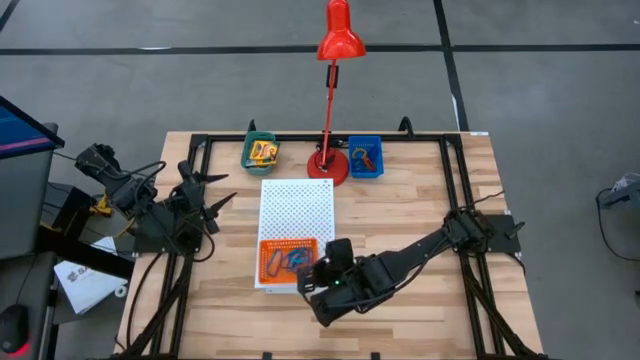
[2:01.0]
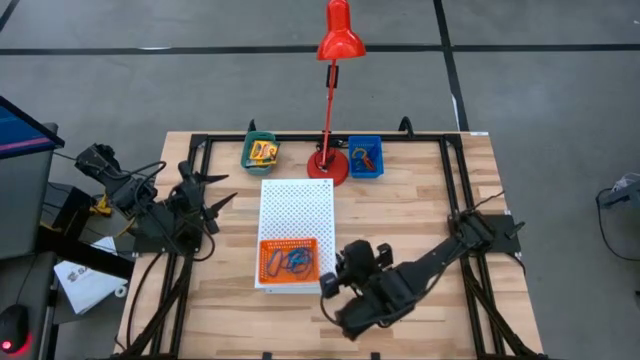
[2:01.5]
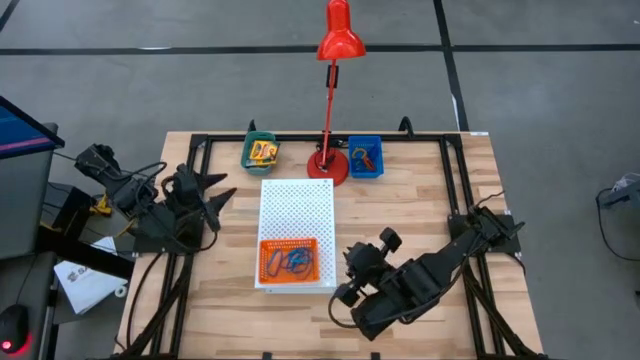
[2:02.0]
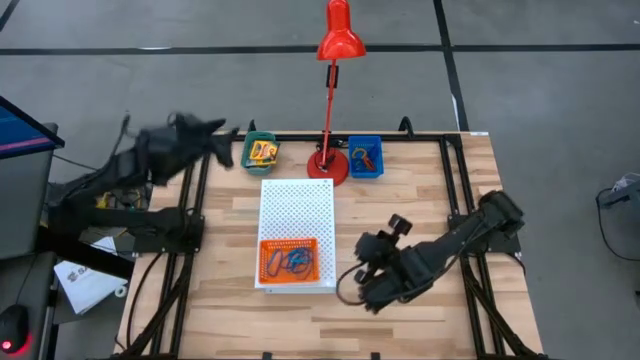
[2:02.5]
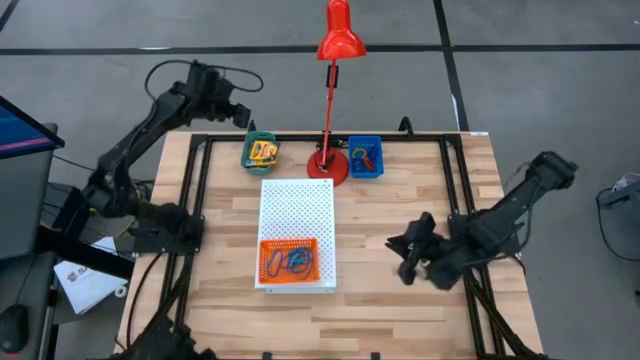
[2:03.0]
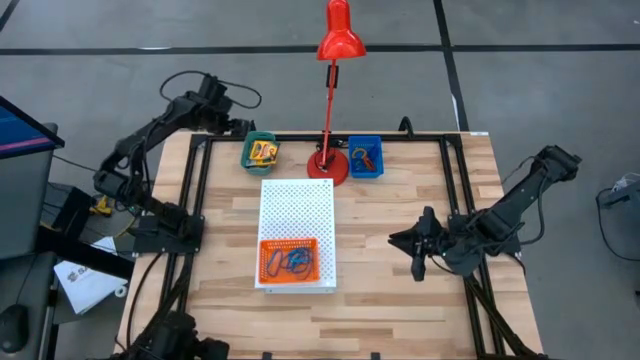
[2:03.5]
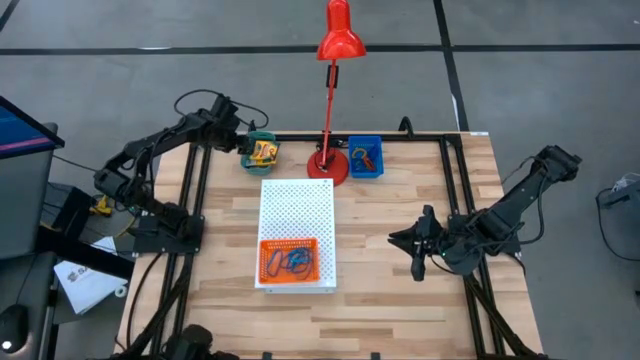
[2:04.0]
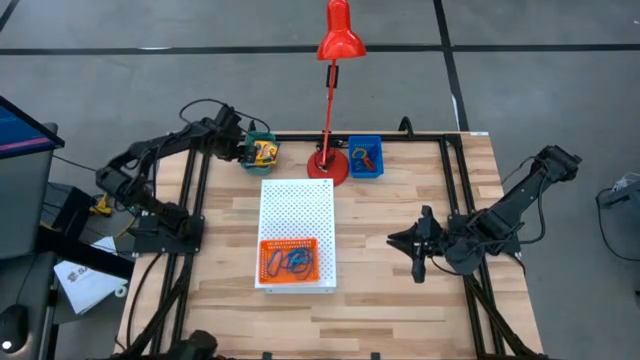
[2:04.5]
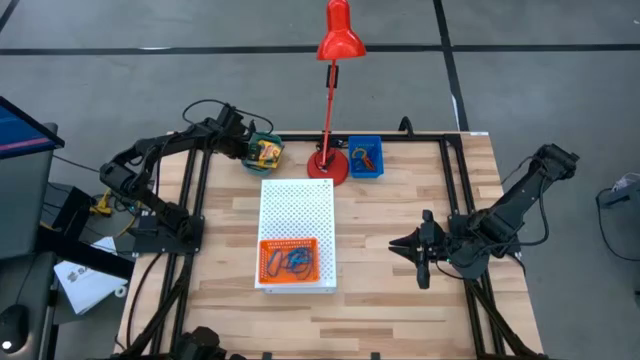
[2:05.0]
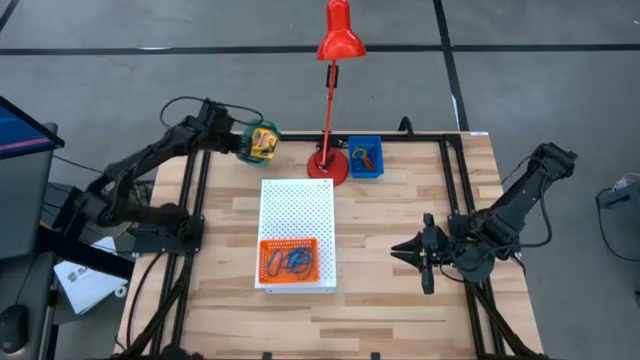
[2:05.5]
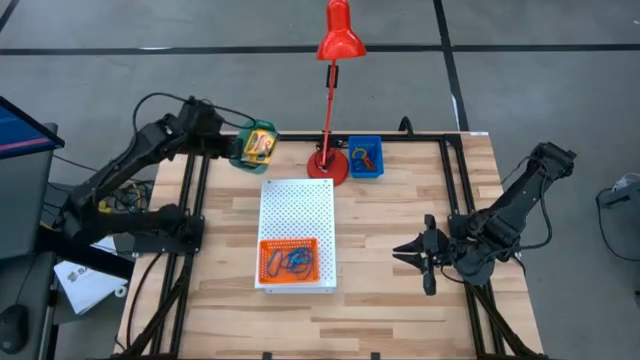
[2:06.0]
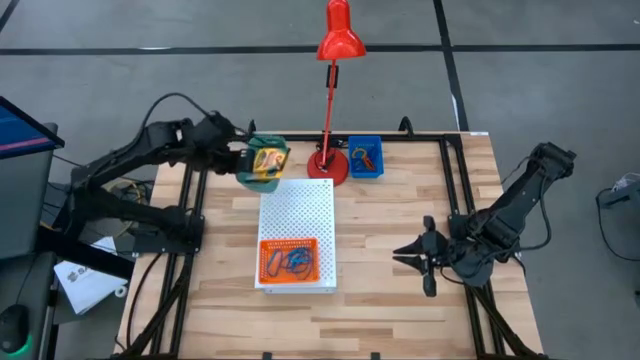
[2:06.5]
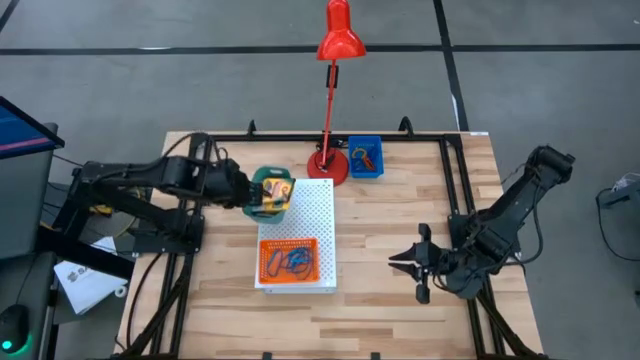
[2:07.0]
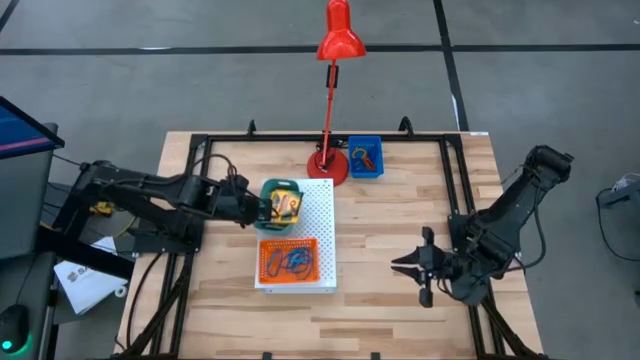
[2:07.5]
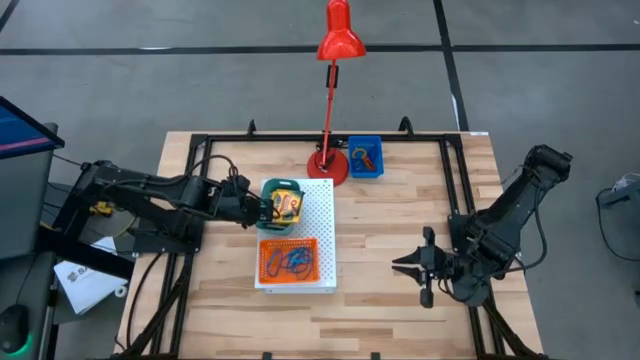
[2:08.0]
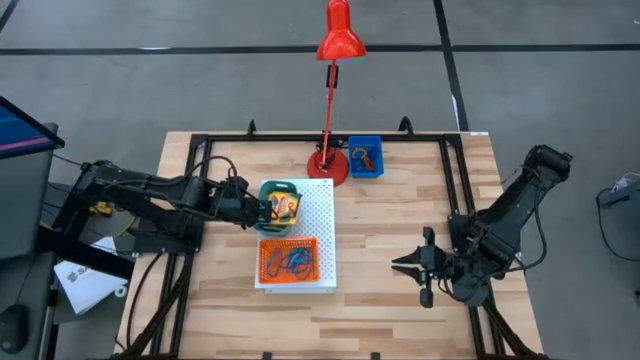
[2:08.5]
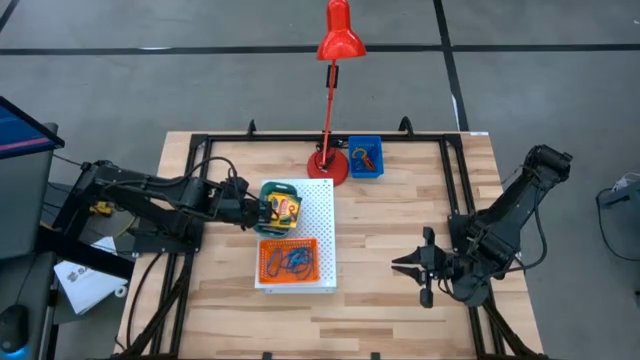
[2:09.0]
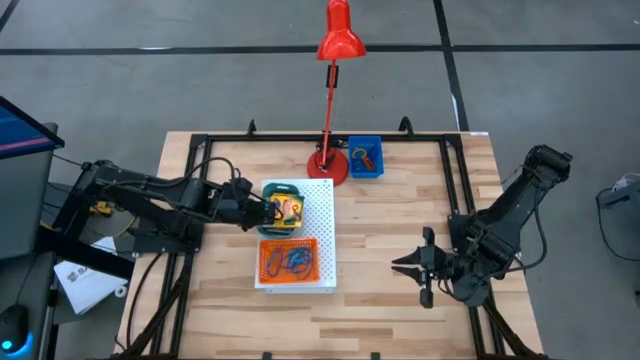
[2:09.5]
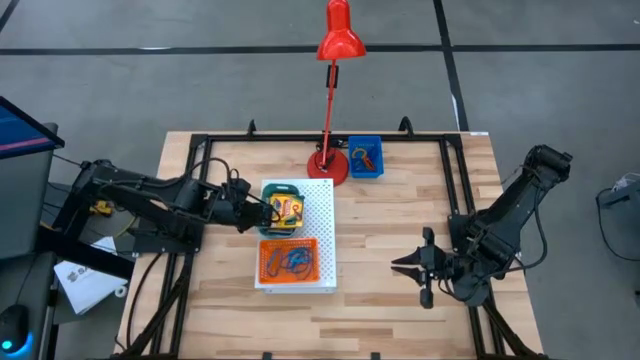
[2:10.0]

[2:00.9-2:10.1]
Task: Pick & Place Office Desk Supplies
Put the green bin on the shelf containing crayon boxes

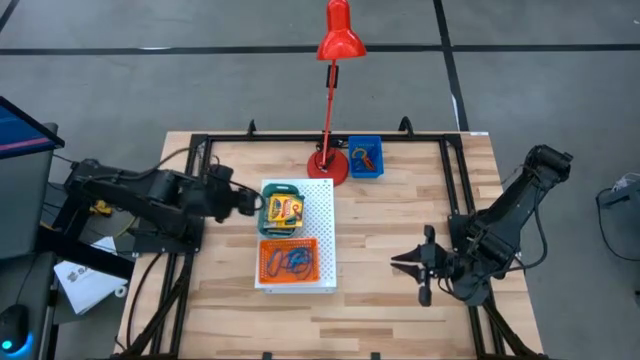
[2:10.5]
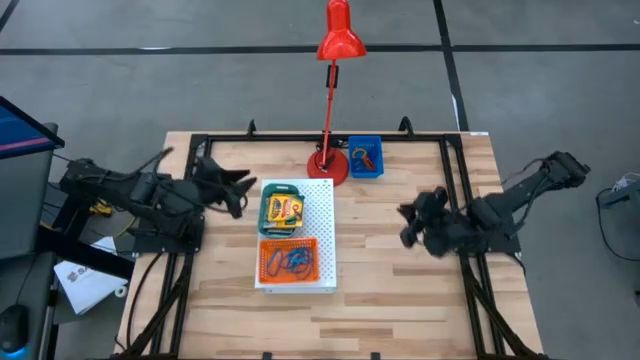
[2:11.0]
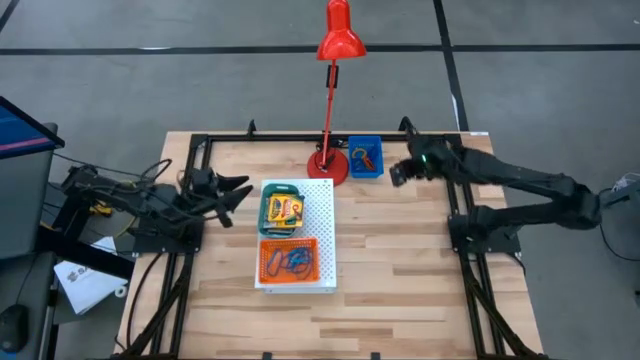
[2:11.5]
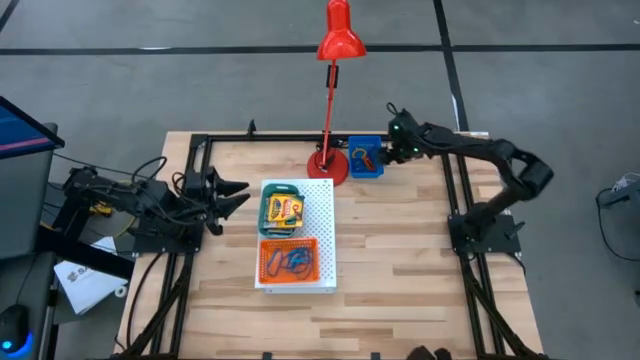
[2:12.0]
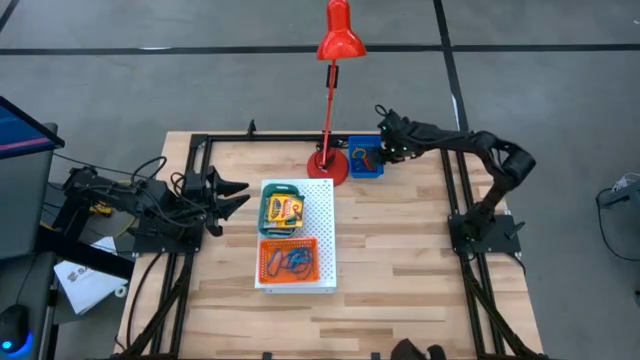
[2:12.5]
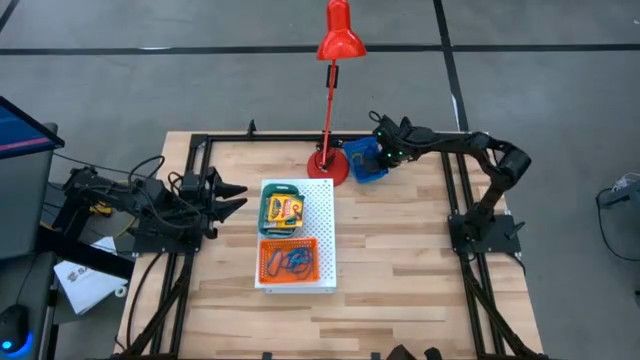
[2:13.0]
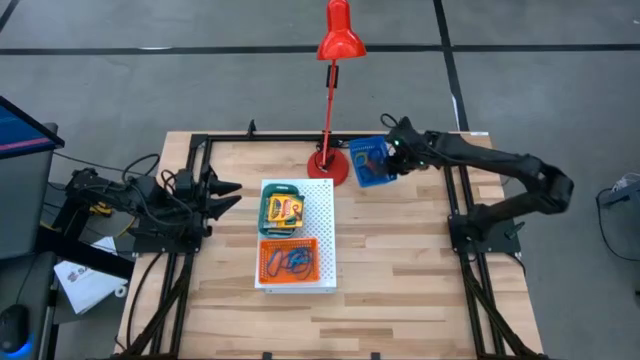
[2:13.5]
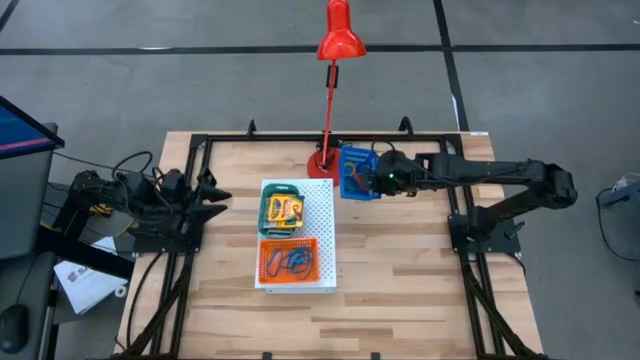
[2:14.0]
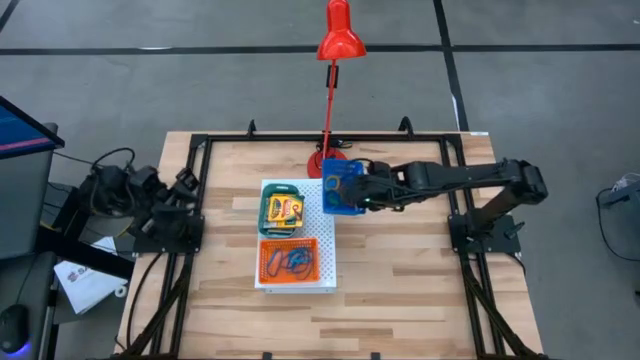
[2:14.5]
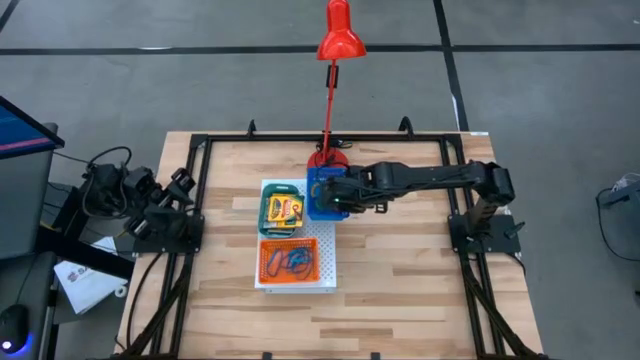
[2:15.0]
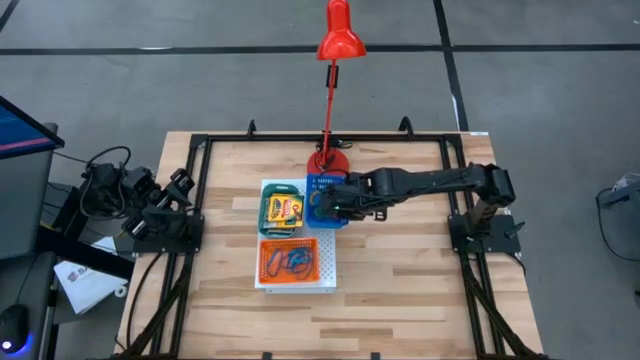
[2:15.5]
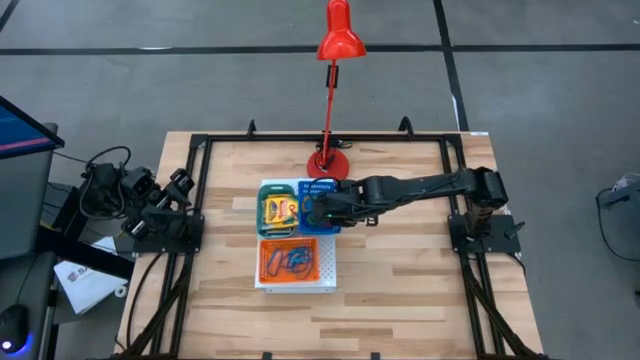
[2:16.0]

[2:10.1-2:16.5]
Put the blue bin on the shelf containing spring keychains

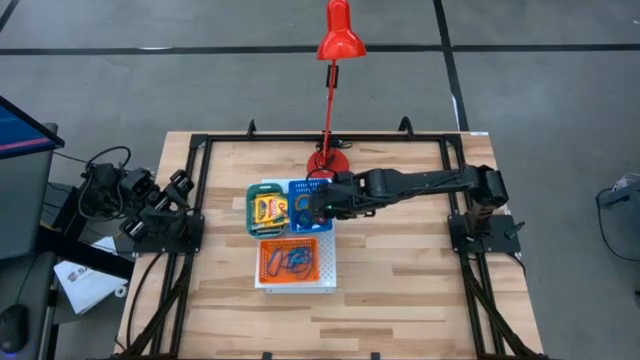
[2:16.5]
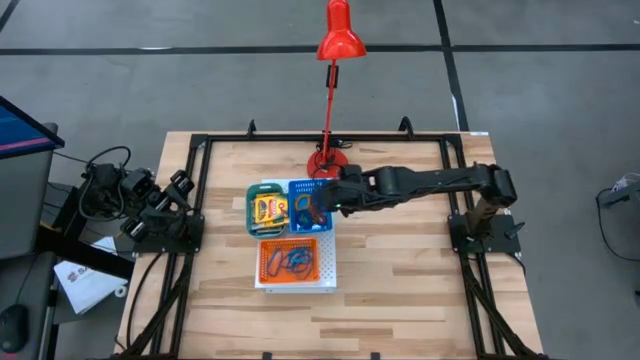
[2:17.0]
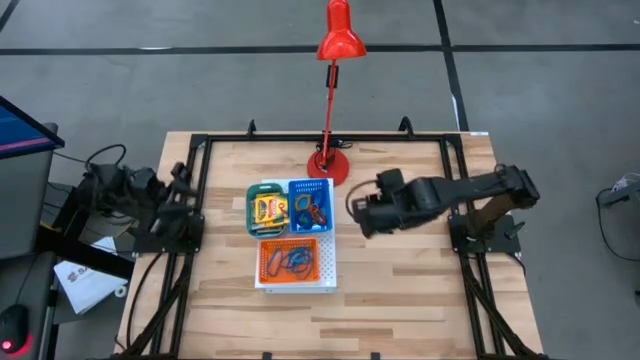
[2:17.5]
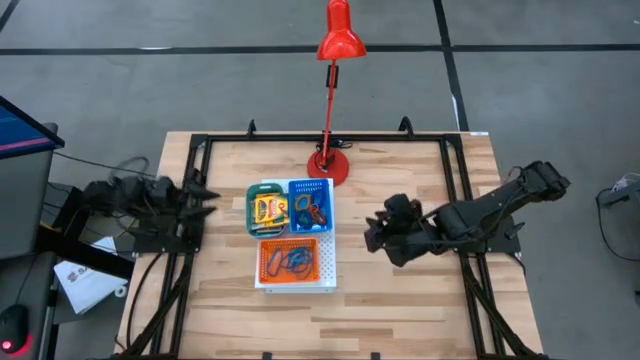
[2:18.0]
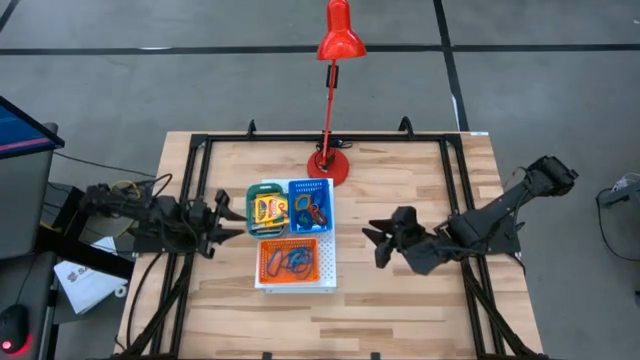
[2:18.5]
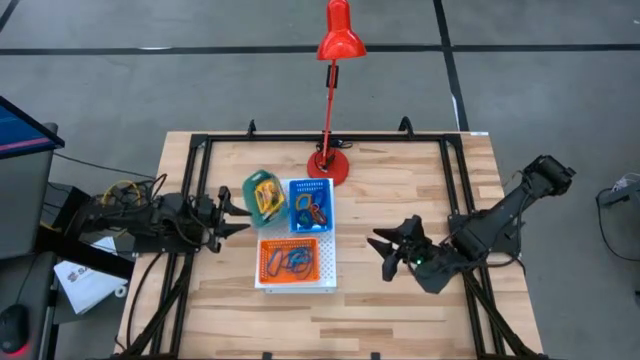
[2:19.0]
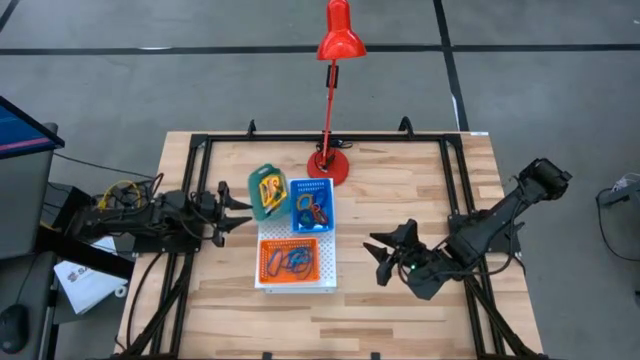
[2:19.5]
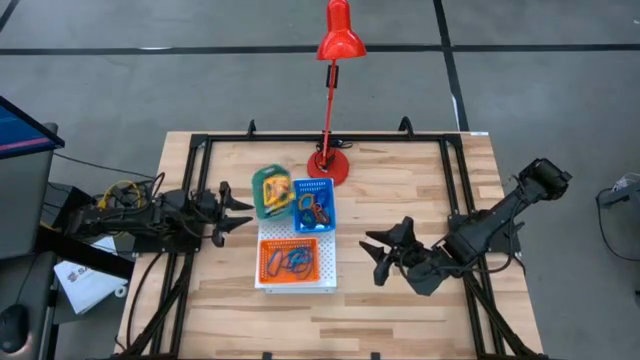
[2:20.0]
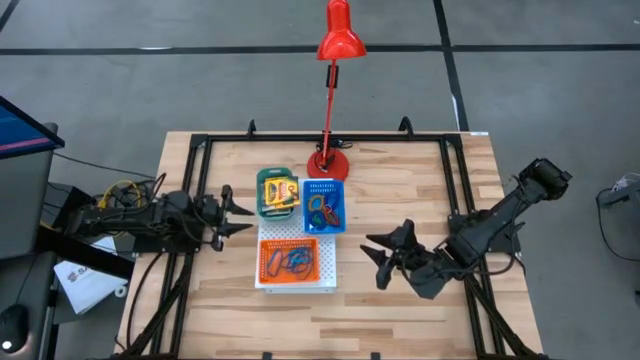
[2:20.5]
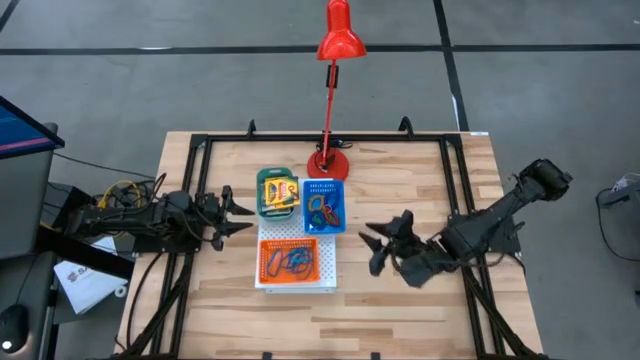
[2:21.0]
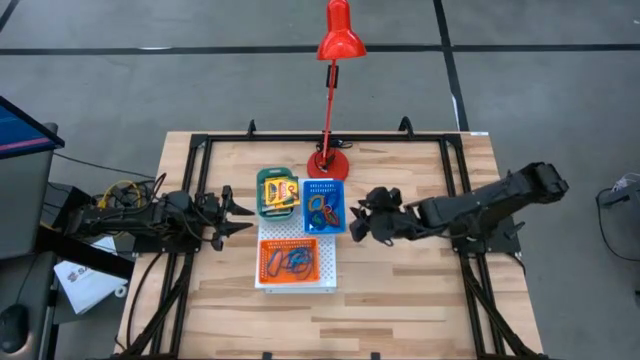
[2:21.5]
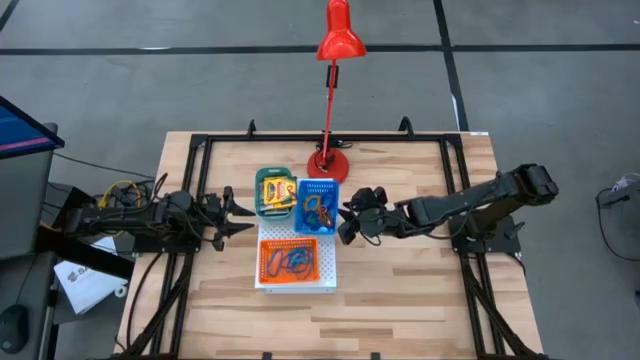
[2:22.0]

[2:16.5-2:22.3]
Adjust the bins on the shelf
